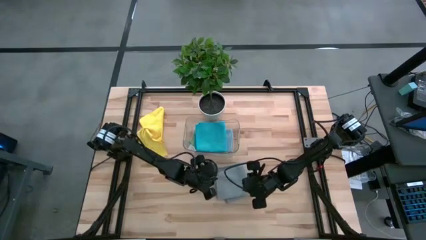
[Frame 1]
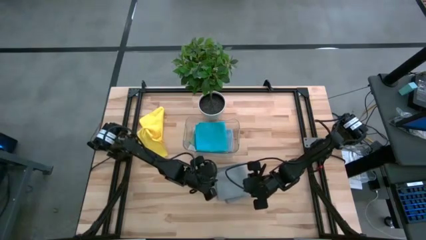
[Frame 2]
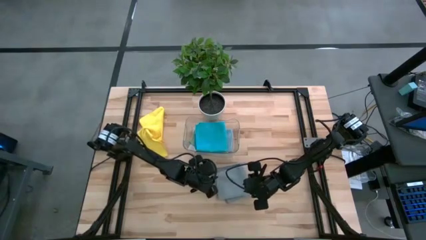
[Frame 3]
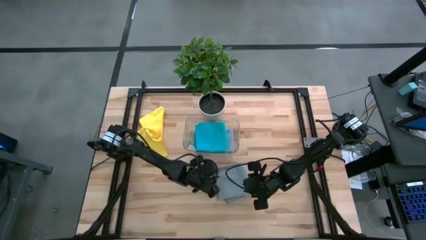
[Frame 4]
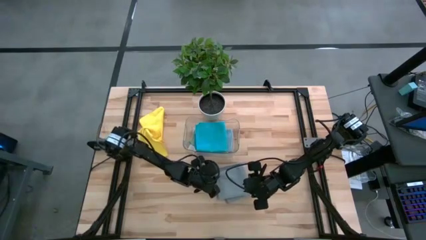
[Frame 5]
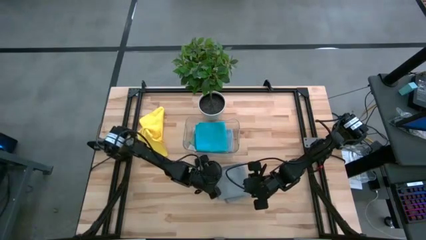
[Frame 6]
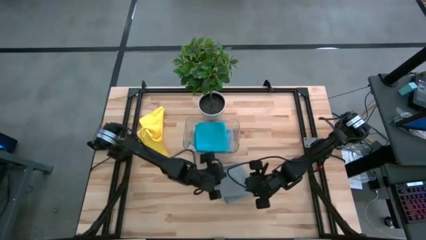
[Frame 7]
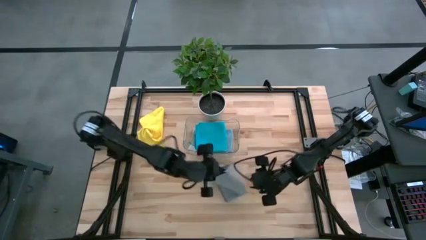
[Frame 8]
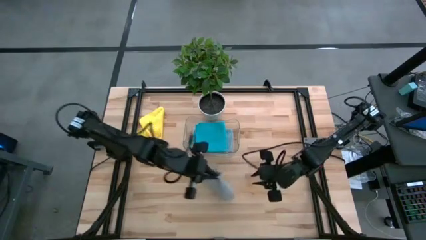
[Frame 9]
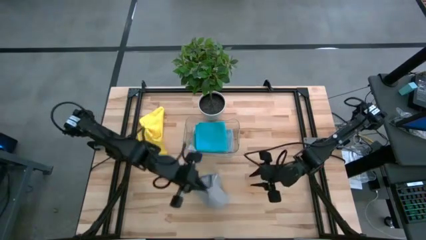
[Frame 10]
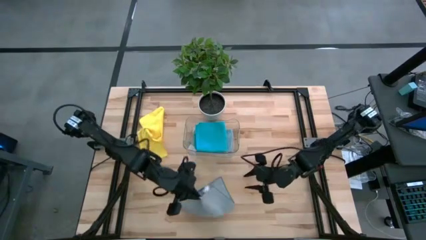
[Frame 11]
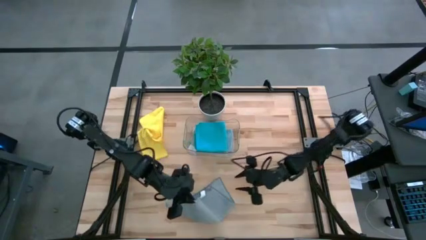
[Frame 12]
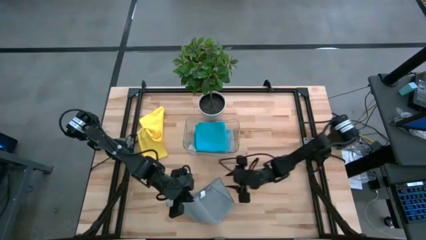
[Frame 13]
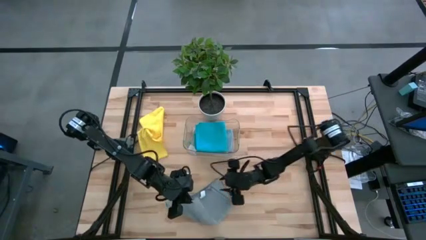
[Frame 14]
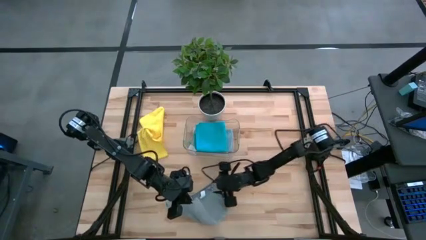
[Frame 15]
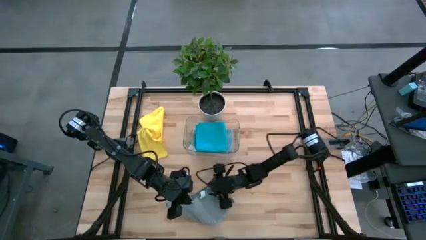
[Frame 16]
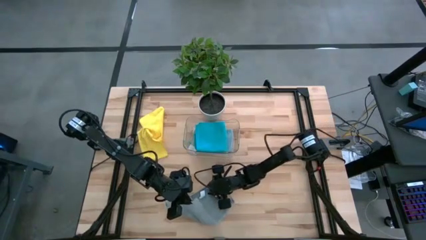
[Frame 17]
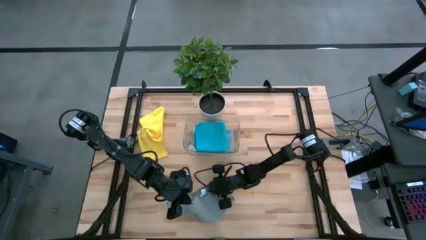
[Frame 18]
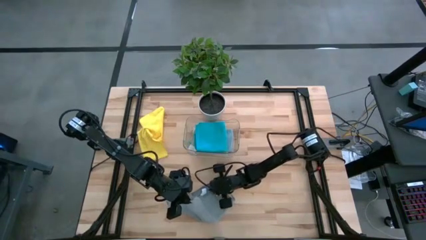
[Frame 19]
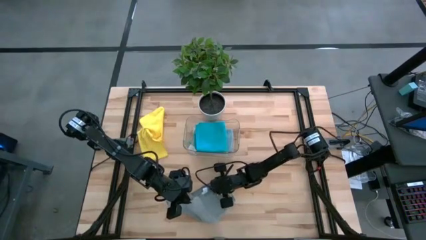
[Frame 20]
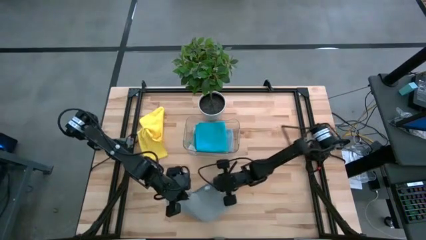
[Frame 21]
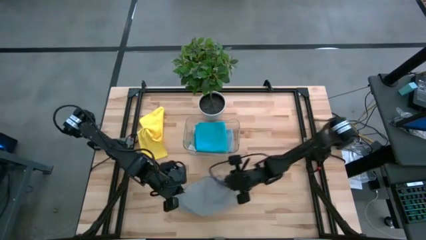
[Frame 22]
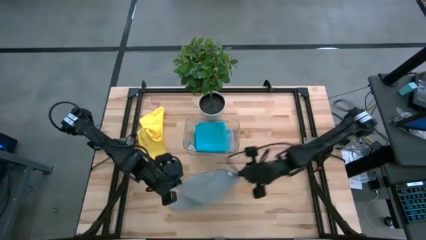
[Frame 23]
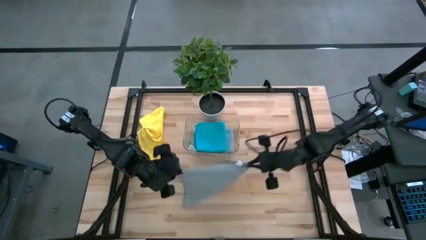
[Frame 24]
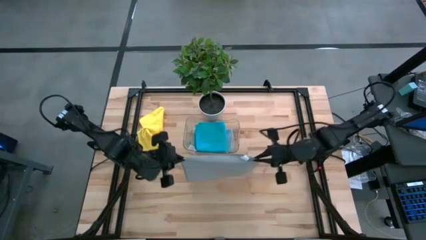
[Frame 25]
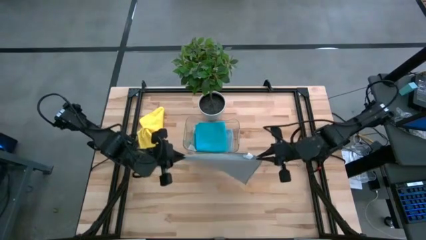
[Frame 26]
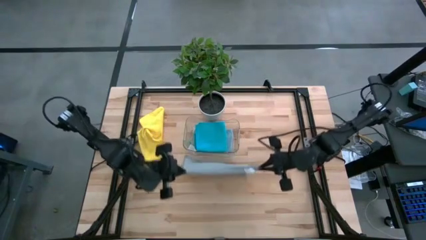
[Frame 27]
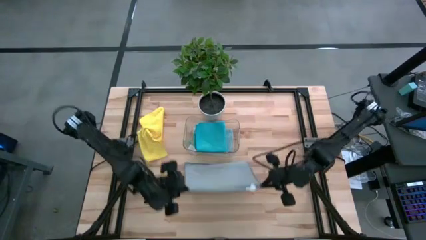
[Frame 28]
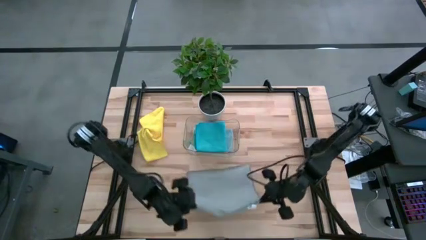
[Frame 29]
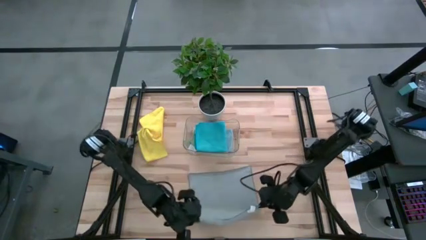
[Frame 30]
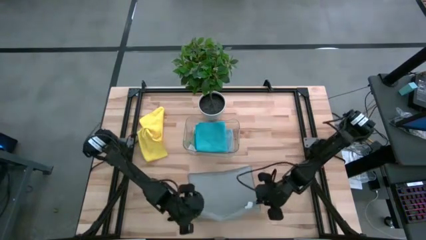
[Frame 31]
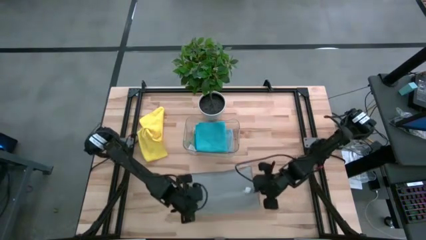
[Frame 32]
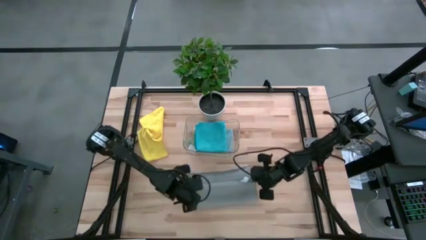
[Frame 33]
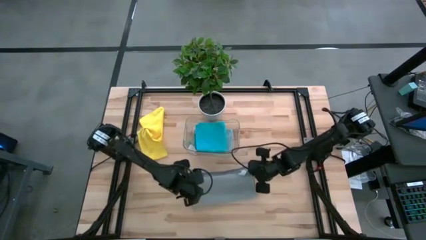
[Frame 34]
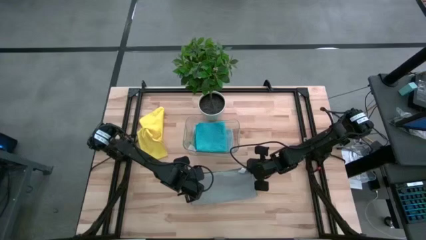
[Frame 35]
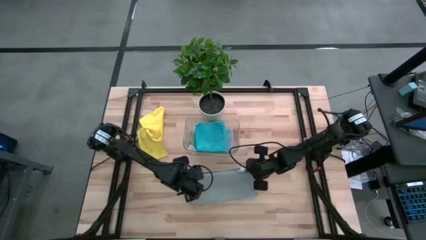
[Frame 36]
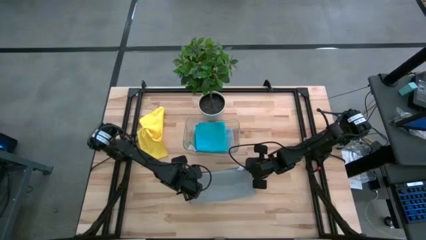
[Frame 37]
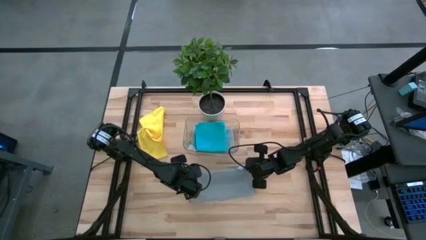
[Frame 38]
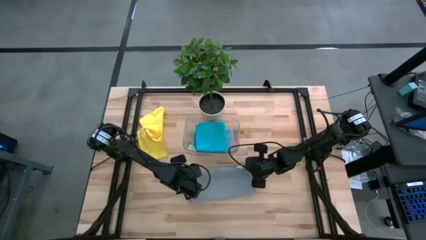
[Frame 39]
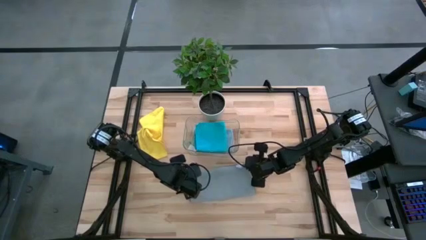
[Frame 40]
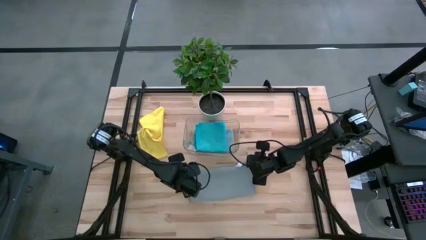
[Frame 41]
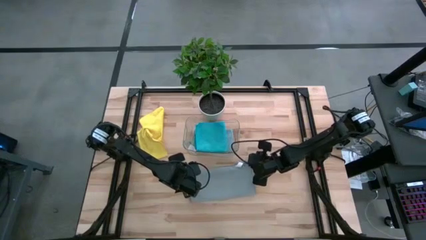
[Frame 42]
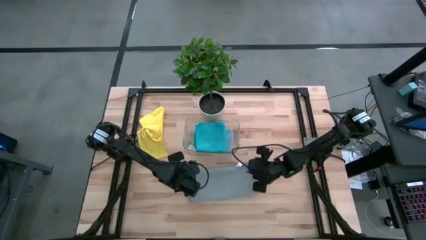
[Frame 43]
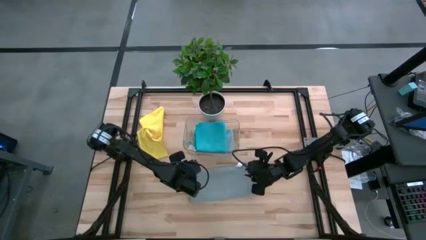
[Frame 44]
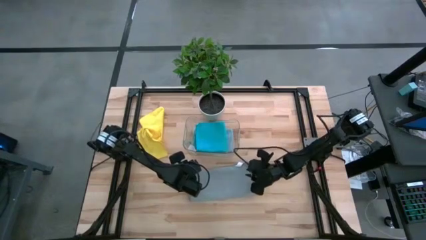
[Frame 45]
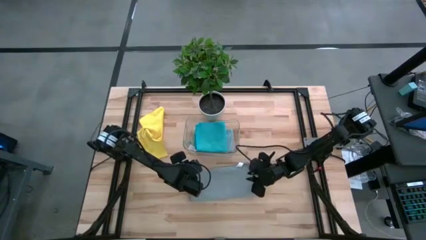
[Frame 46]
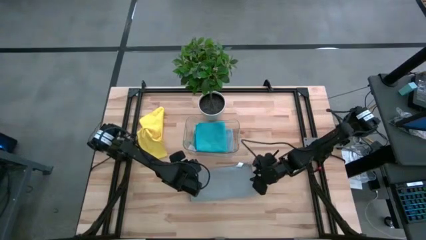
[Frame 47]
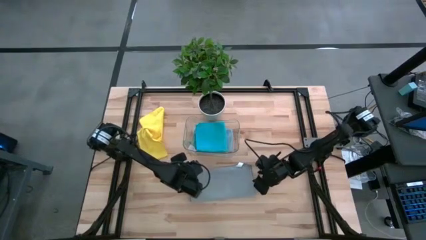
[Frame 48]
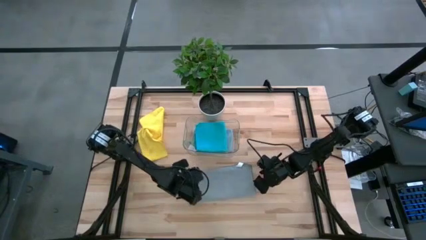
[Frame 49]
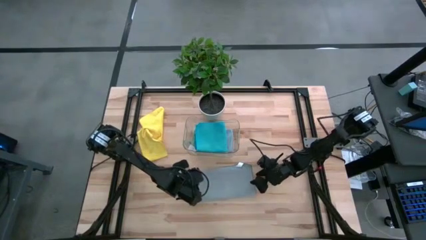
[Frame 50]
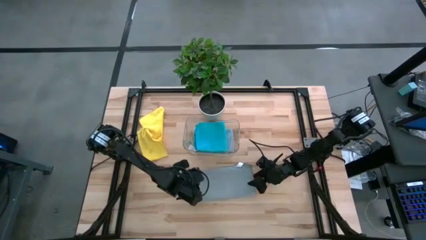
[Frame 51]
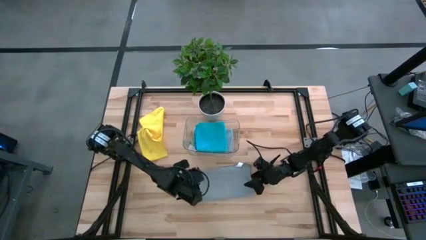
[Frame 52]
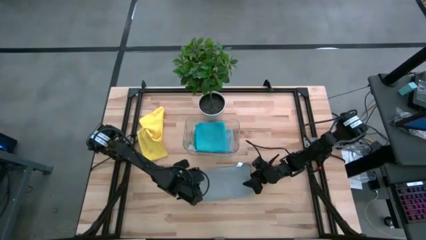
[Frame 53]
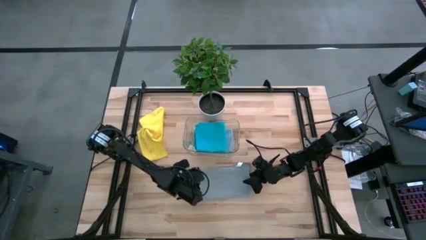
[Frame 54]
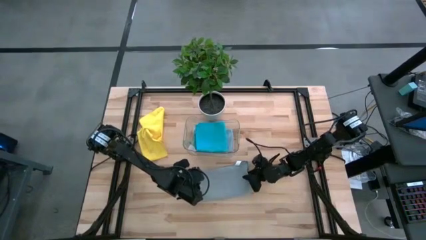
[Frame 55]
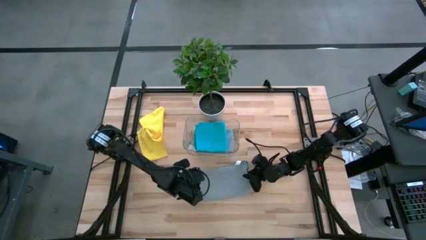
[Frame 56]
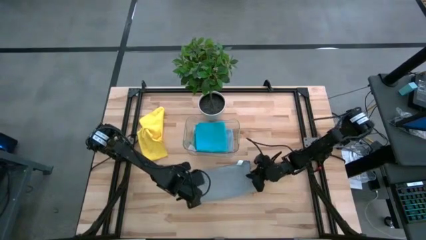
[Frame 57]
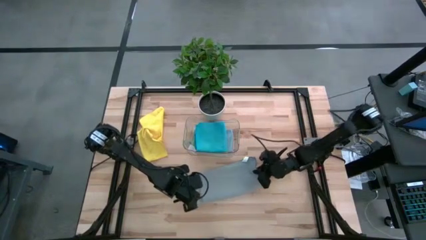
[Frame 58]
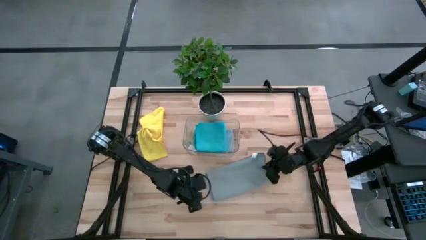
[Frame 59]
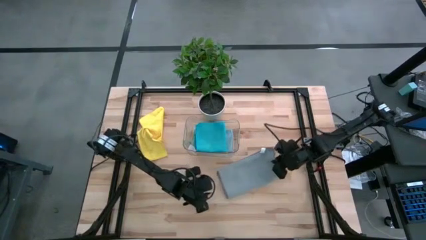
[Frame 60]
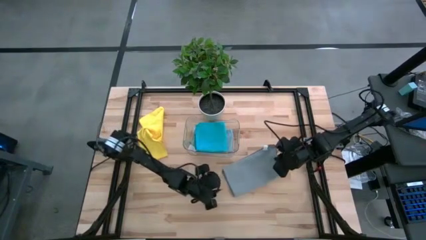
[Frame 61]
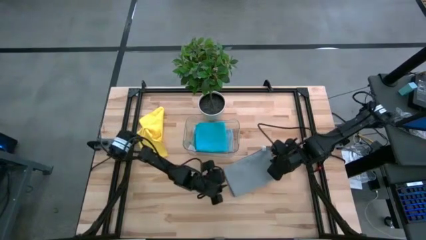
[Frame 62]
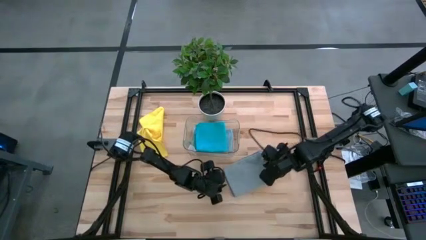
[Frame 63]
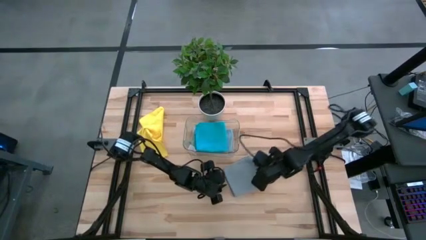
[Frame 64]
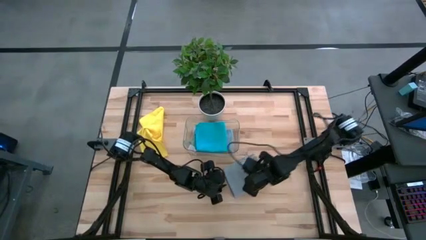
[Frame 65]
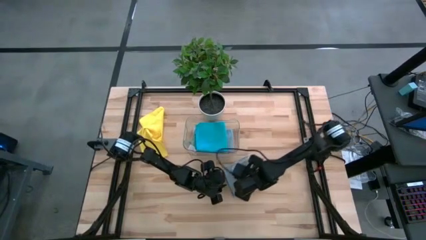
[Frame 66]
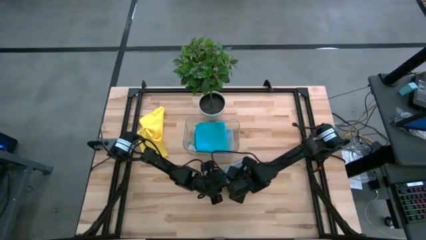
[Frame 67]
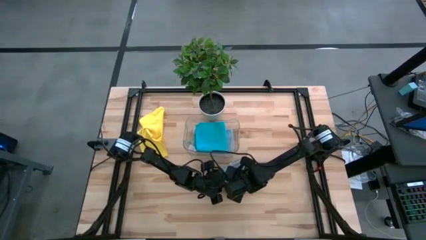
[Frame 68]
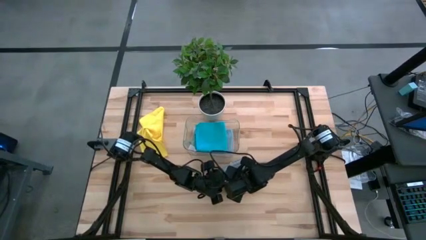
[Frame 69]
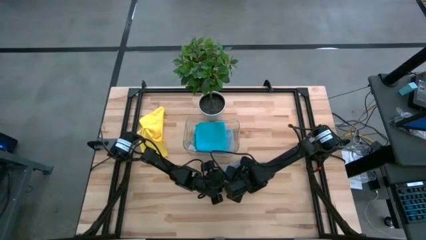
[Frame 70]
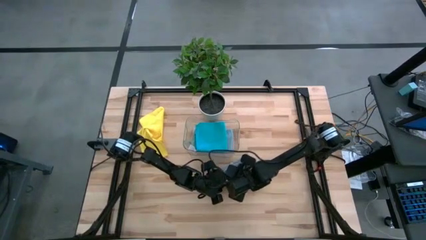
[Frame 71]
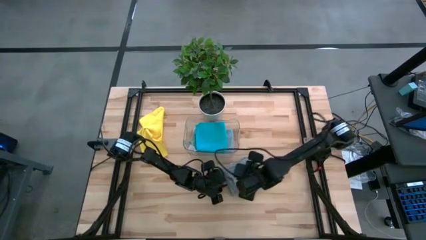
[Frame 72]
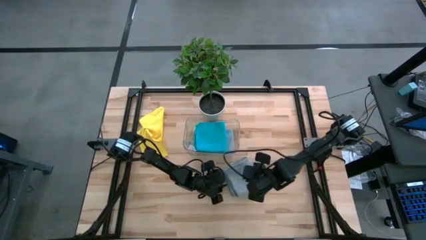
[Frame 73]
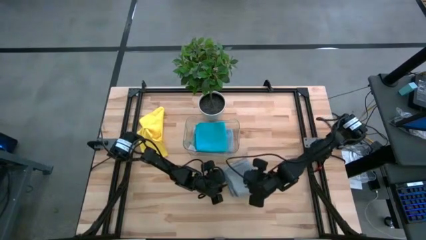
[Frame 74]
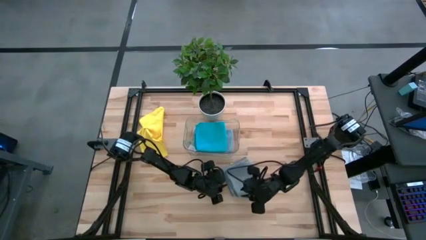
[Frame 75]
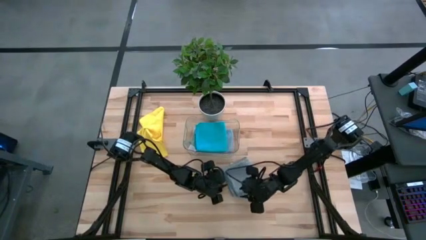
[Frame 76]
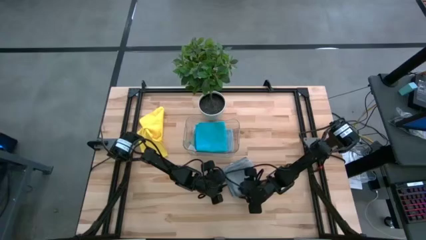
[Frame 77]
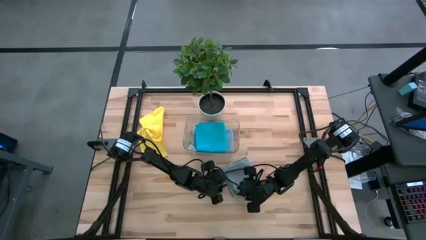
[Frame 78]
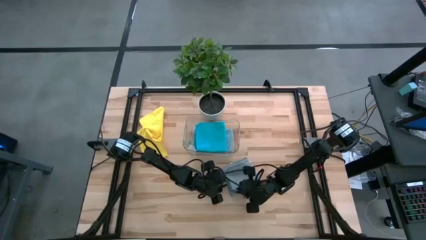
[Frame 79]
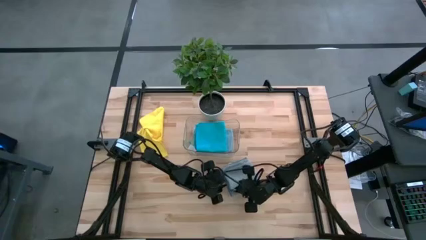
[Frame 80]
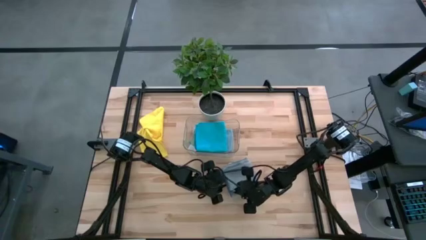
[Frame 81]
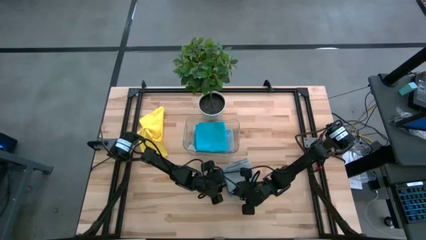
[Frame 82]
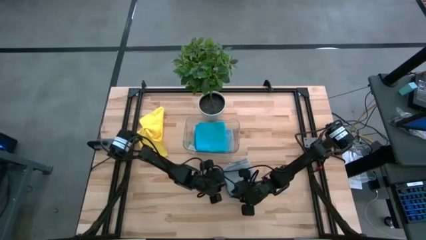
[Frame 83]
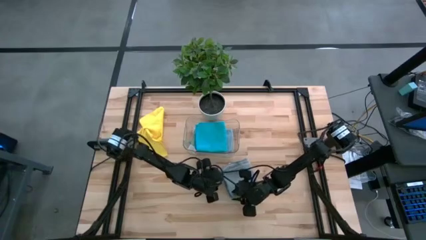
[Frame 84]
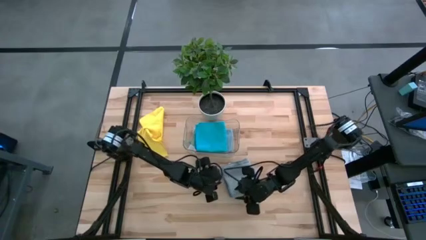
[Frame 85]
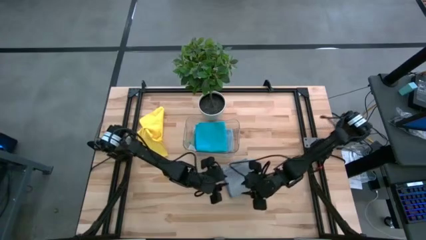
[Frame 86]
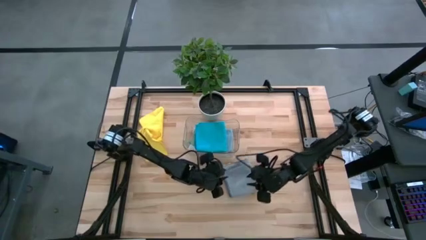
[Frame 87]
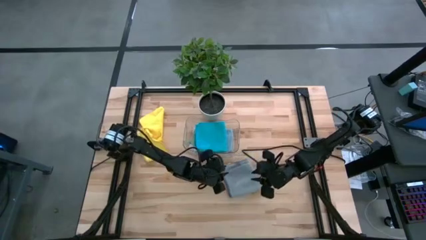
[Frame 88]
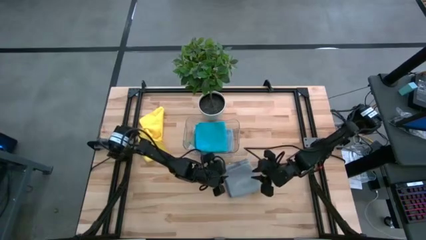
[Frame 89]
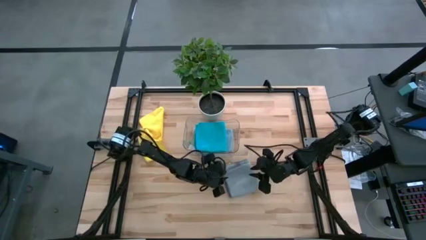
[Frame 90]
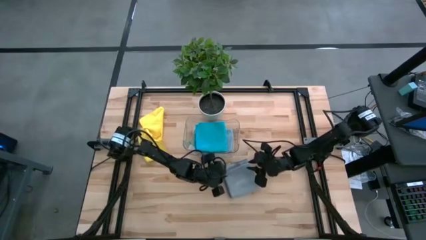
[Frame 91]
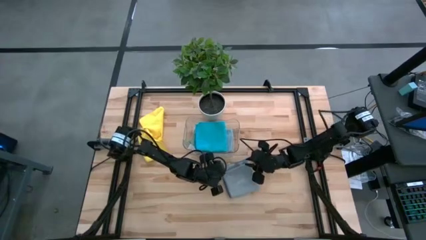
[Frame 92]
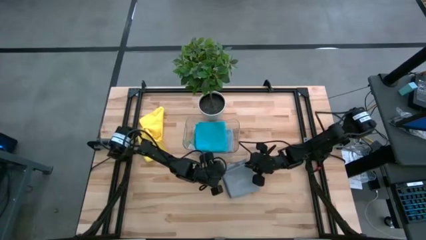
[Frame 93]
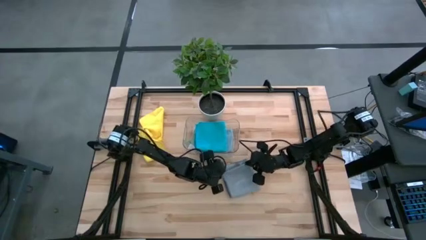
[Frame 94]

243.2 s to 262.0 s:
Task: Fold microfiber towels
Fold the gray microfiber cloth
